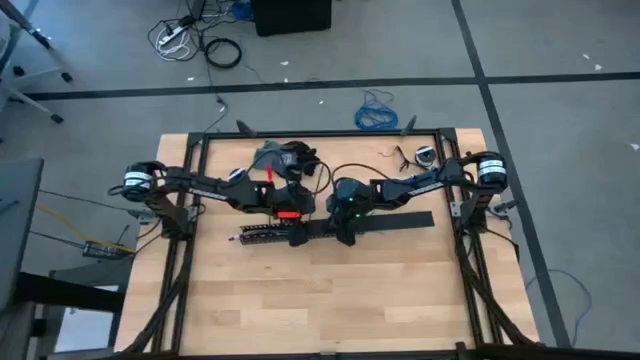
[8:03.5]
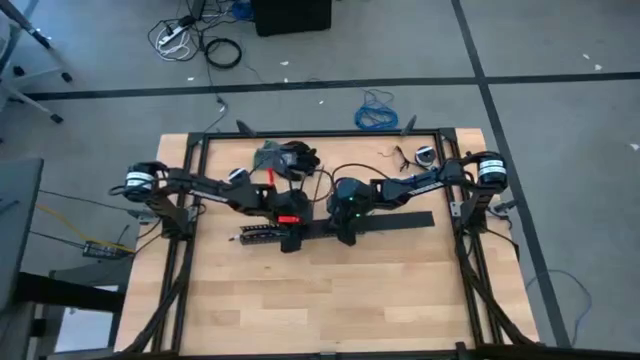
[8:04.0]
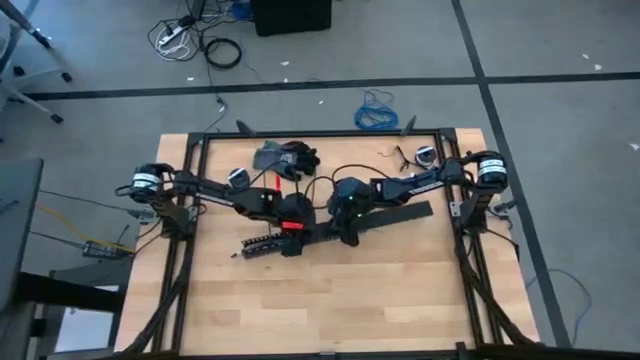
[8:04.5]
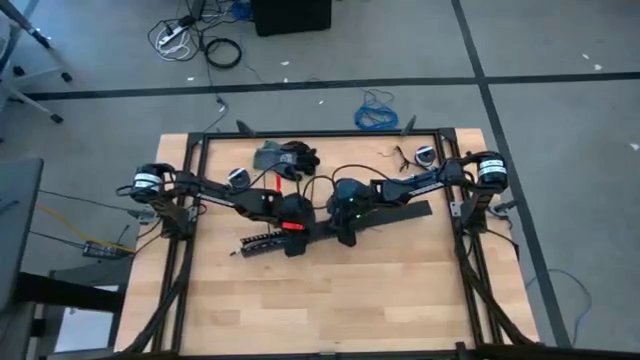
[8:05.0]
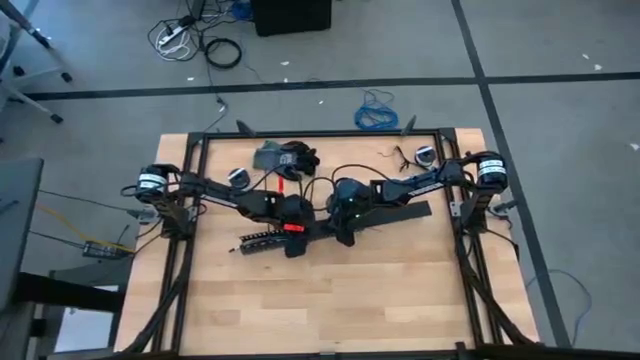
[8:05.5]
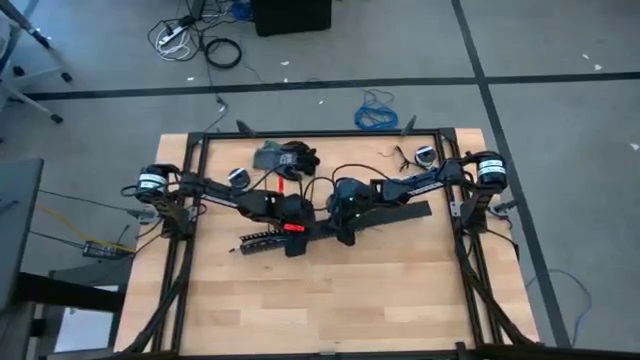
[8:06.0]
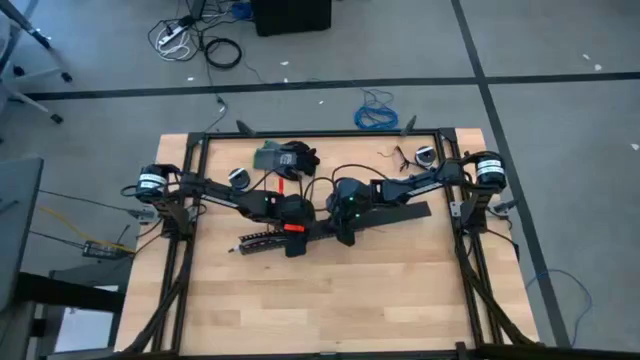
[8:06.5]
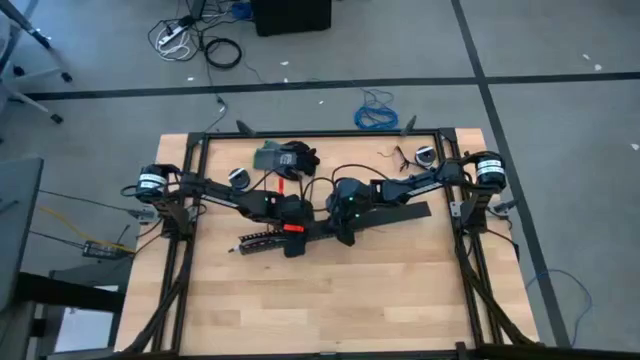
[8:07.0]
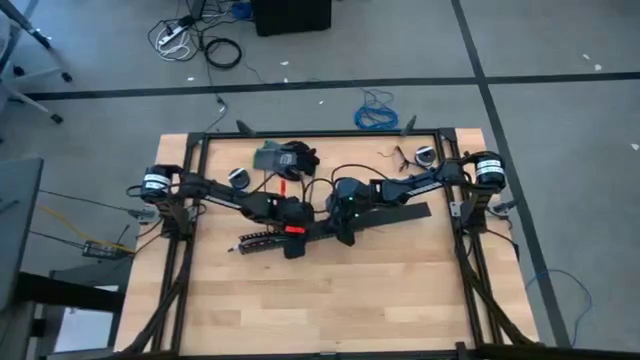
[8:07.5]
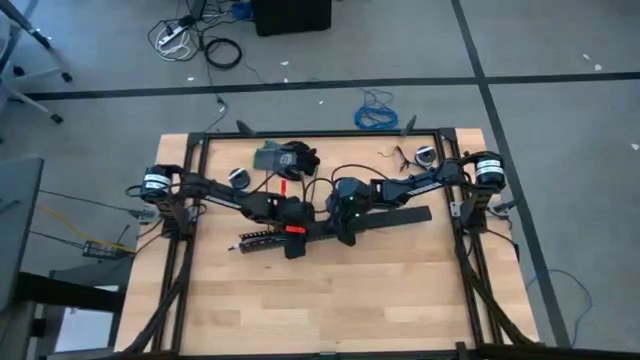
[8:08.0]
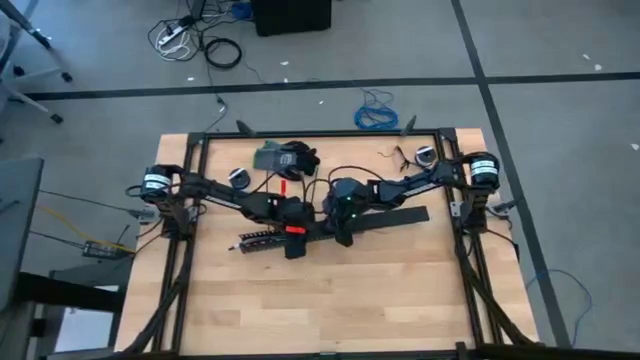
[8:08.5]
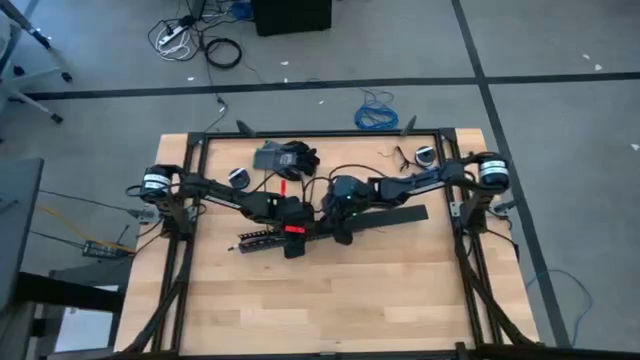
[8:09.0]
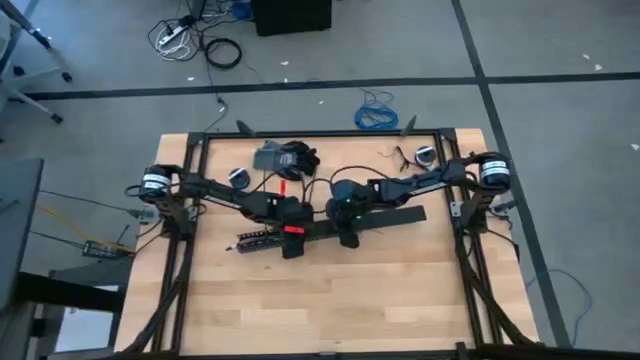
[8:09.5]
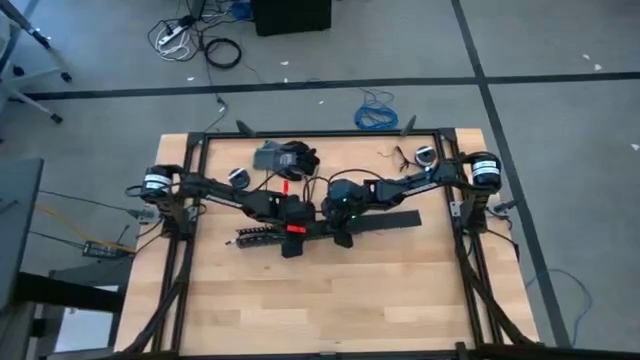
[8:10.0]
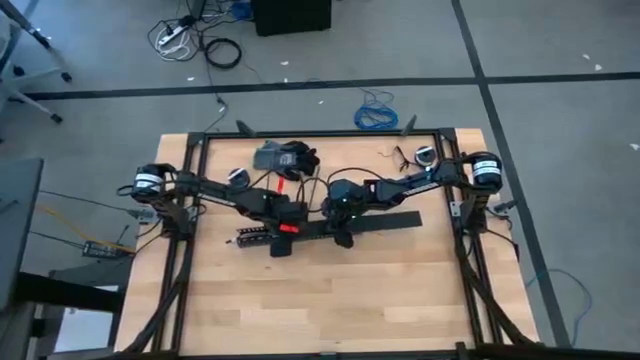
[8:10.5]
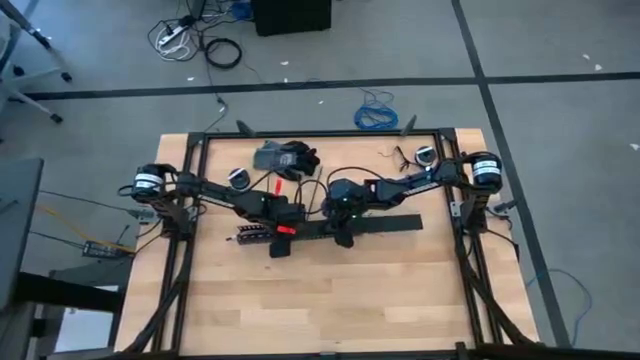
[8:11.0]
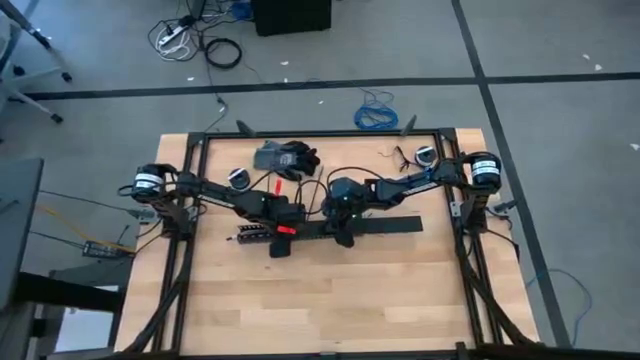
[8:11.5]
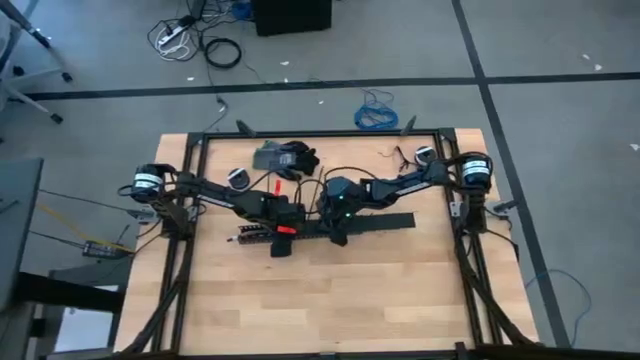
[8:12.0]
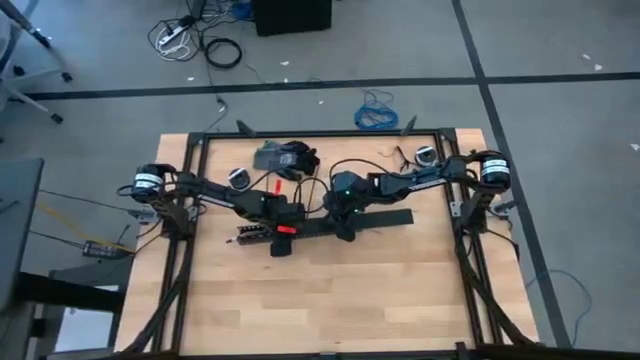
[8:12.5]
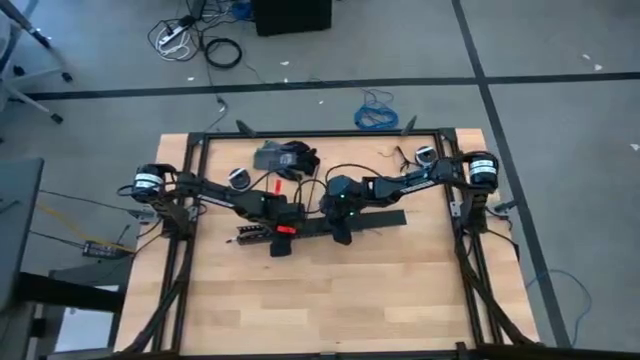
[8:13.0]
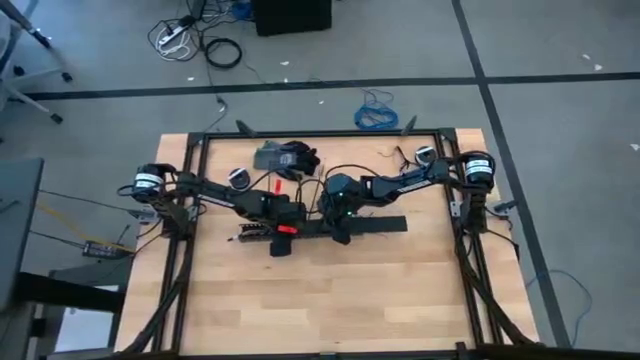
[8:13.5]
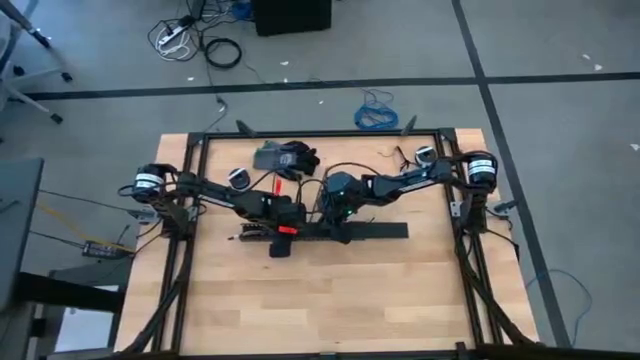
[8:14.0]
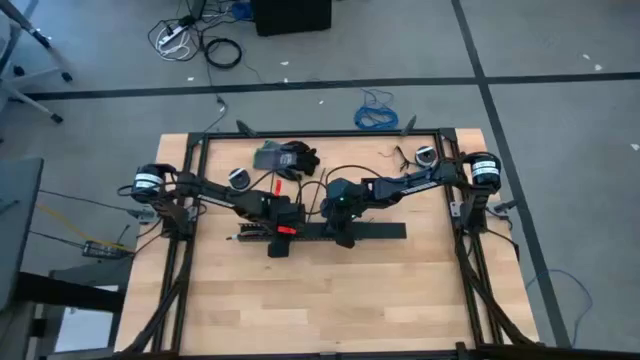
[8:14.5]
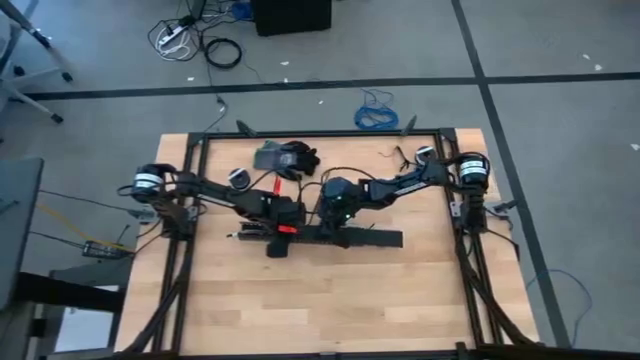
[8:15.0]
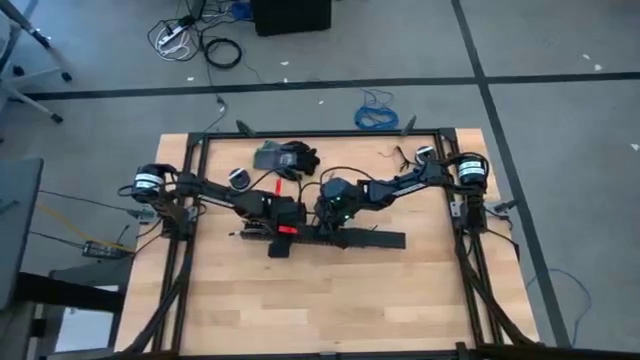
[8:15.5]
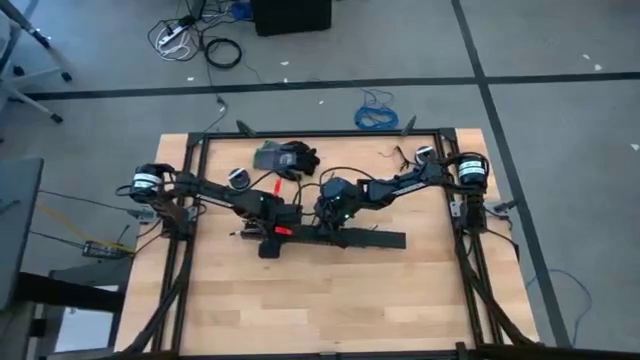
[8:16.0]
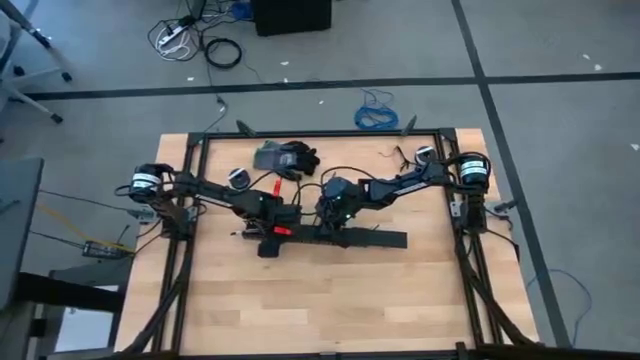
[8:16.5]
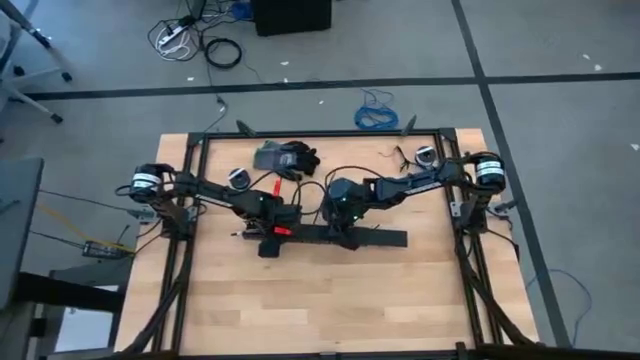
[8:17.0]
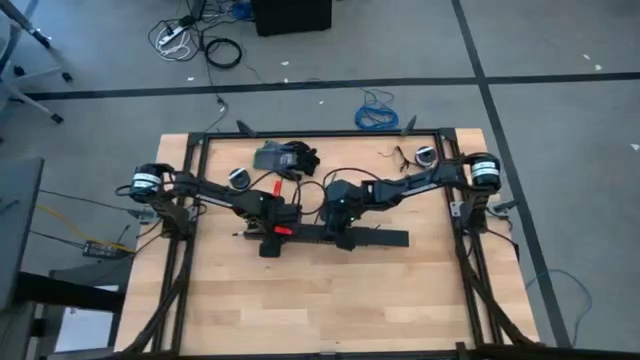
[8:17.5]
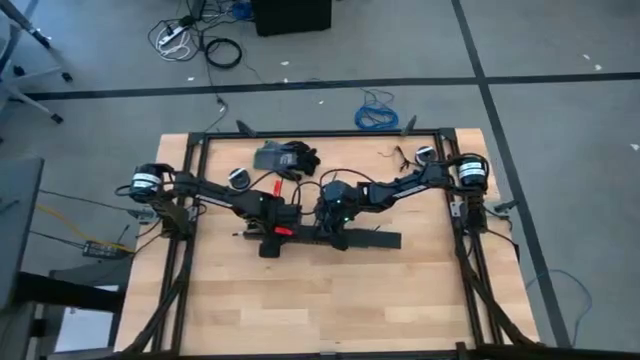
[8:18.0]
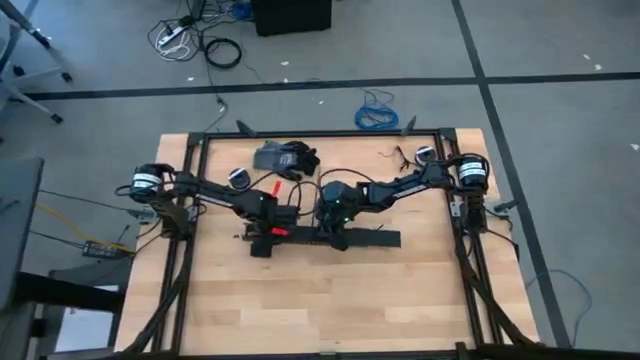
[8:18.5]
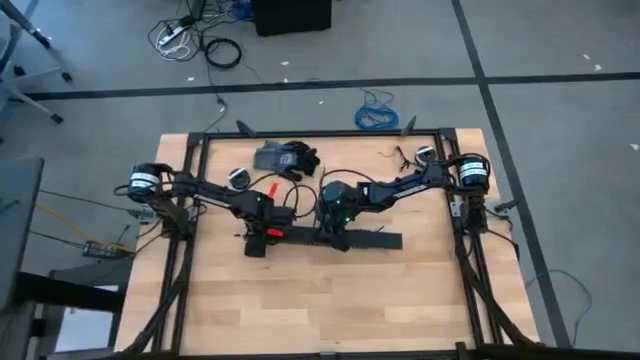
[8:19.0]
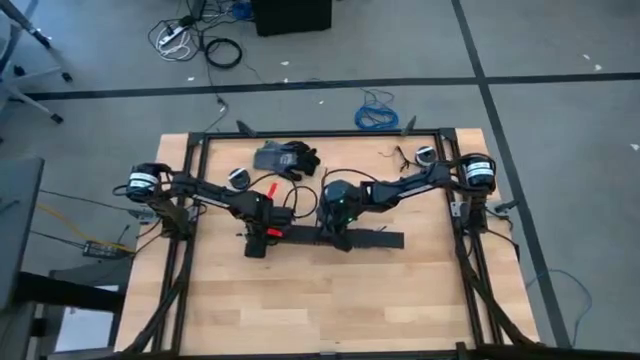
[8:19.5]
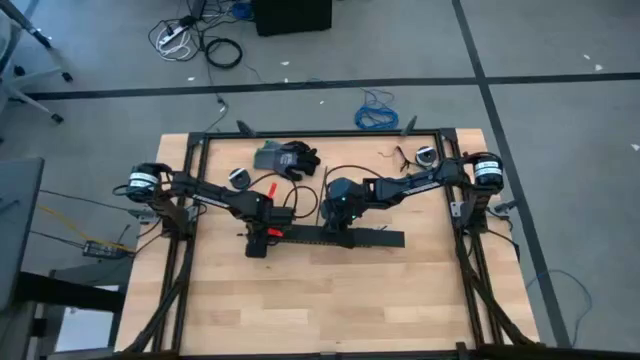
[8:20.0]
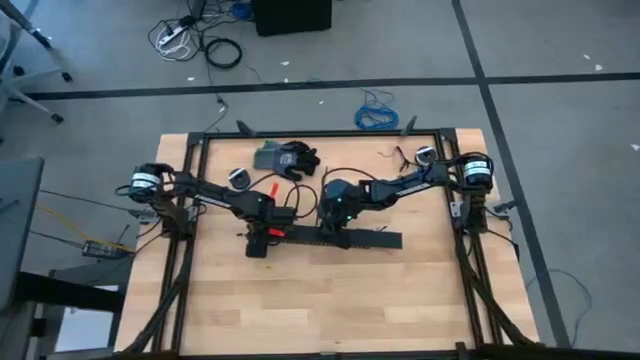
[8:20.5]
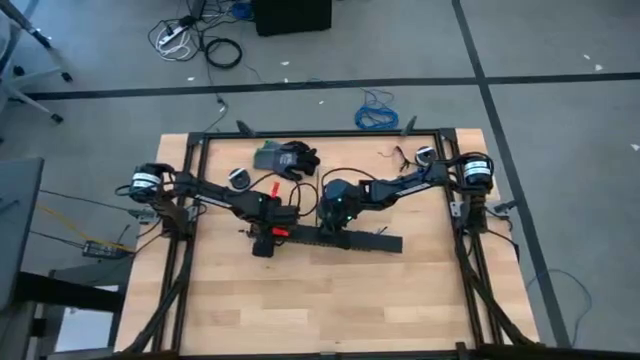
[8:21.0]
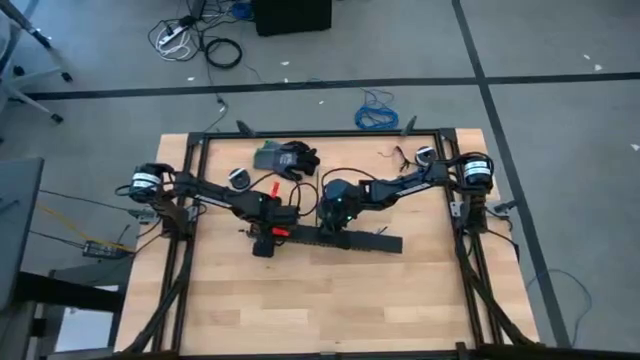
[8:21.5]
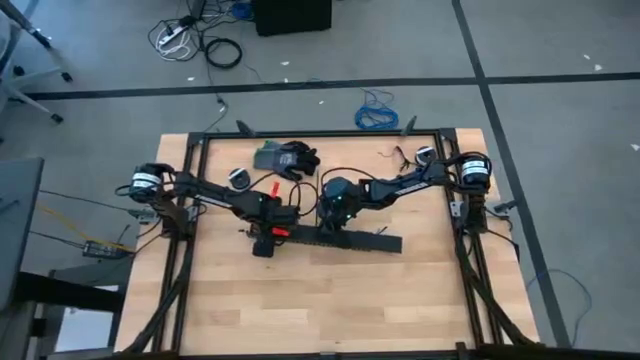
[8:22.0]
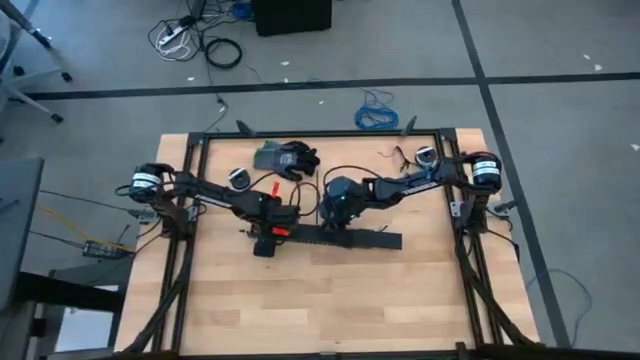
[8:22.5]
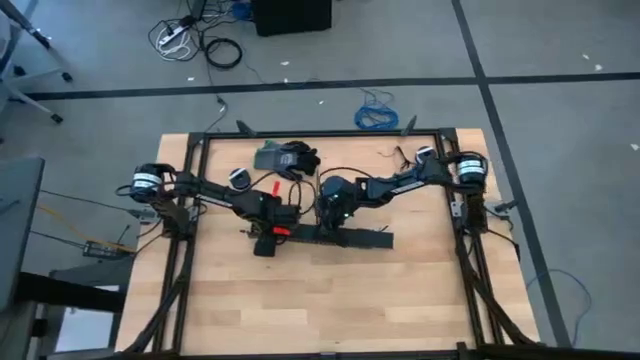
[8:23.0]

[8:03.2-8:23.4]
Task: Ziptie cables
Close the black cable duct cover

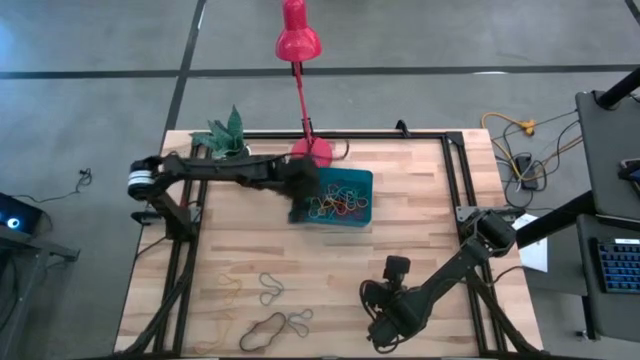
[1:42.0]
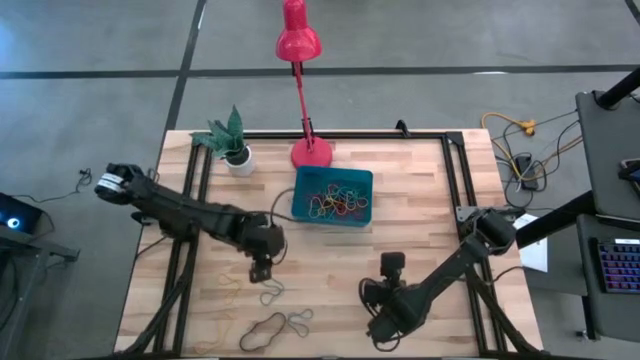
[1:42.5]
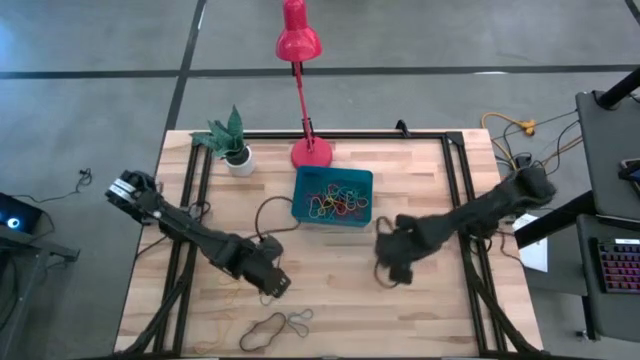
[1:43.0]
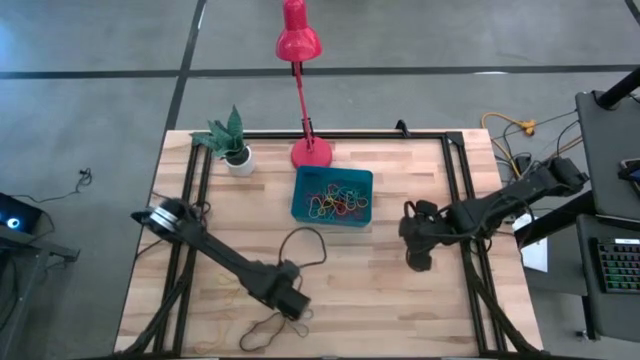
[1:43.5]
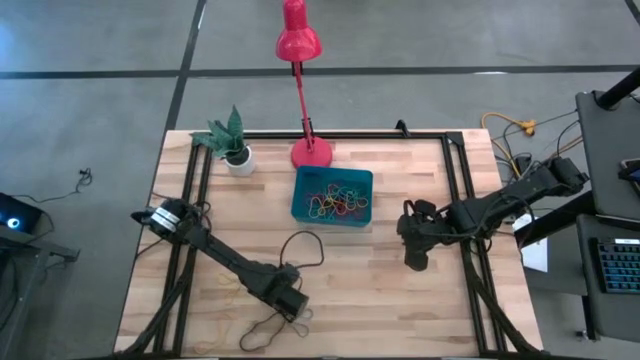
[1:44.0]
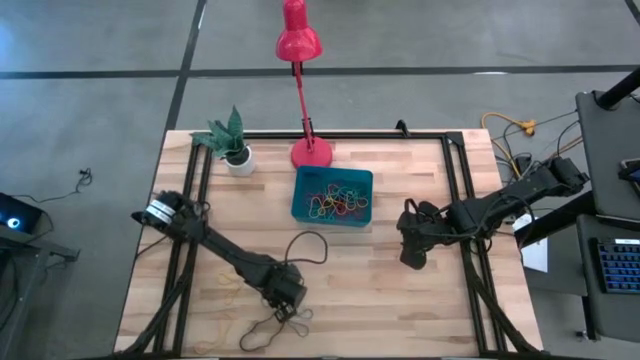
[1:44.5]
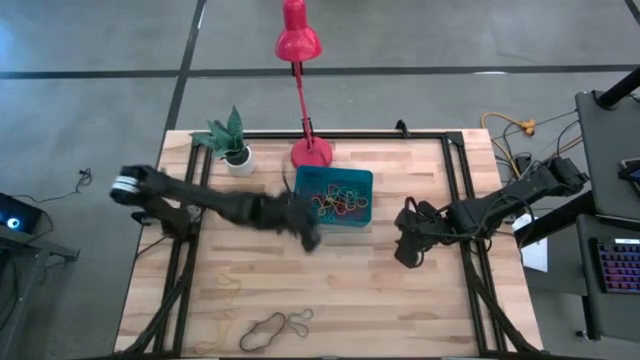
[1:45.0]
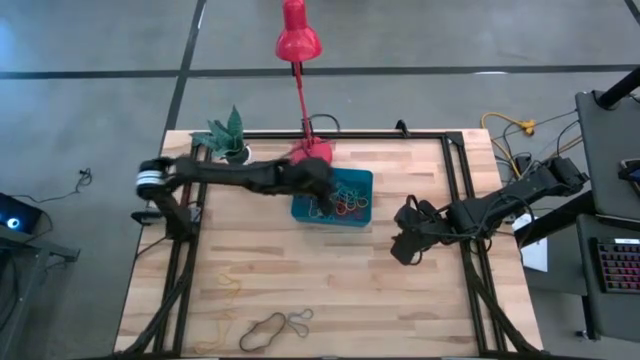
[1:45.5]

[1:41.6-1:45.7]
Task: Pick and place rubber bands into bin
Put the blue rubber band into the blue bin
